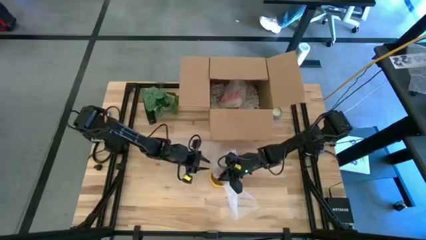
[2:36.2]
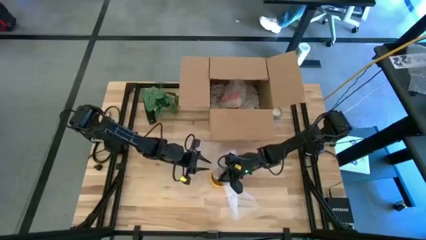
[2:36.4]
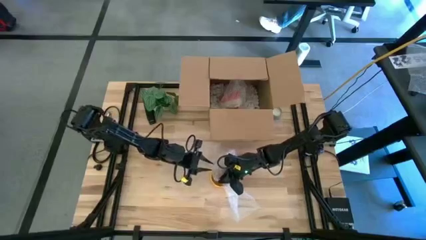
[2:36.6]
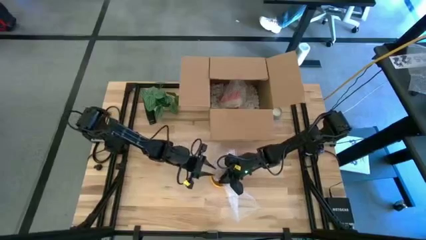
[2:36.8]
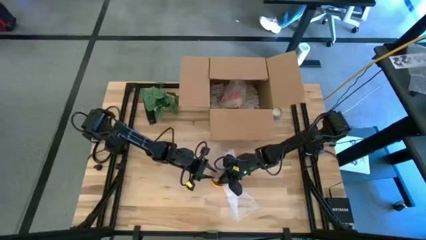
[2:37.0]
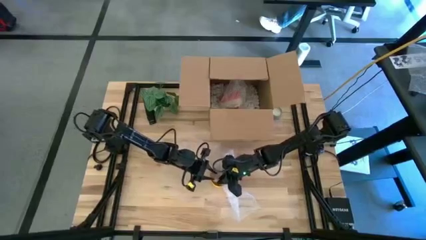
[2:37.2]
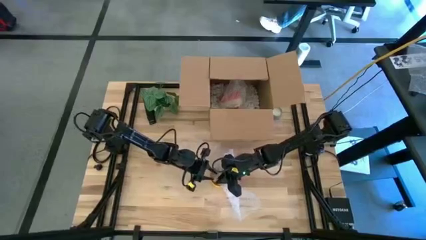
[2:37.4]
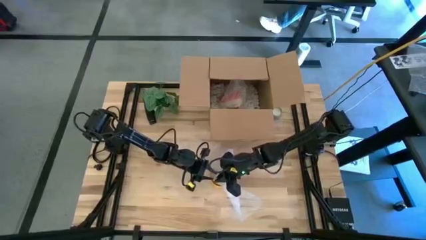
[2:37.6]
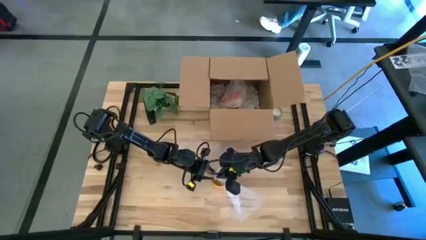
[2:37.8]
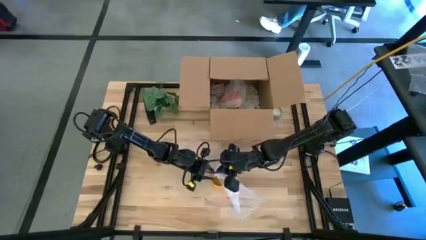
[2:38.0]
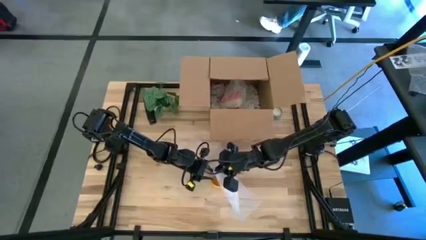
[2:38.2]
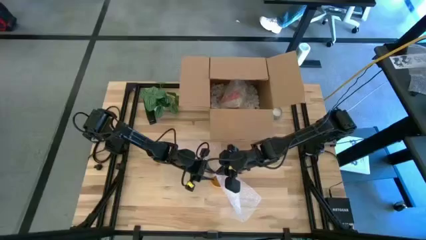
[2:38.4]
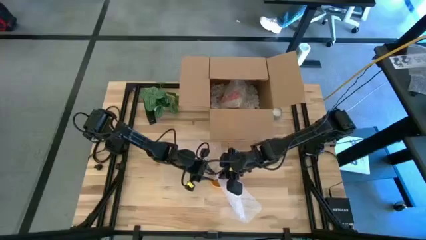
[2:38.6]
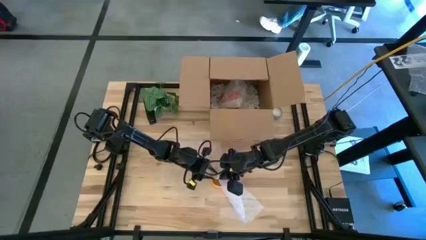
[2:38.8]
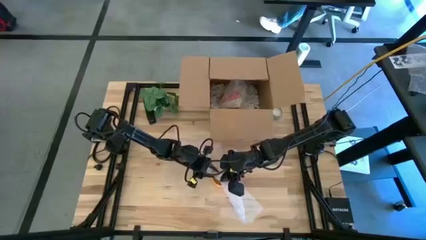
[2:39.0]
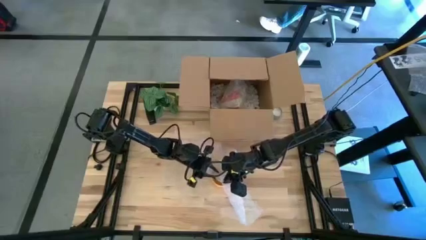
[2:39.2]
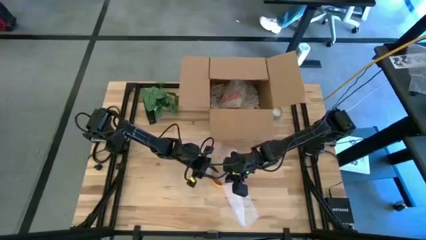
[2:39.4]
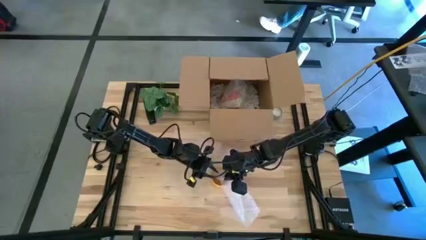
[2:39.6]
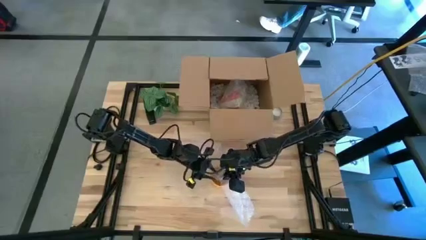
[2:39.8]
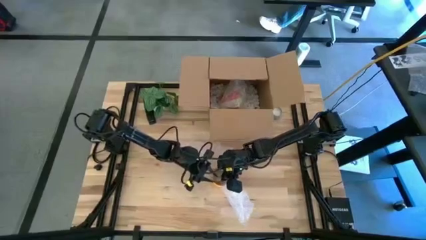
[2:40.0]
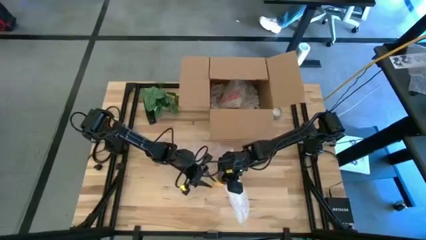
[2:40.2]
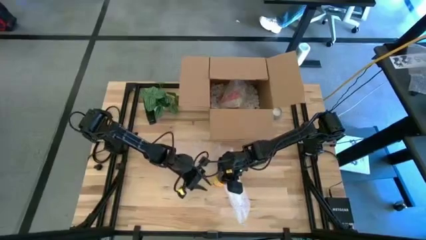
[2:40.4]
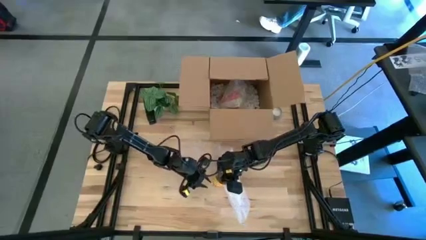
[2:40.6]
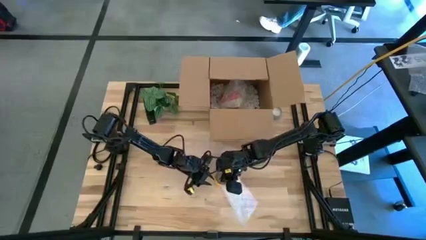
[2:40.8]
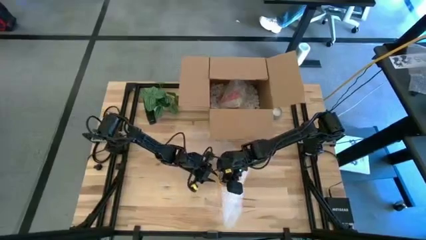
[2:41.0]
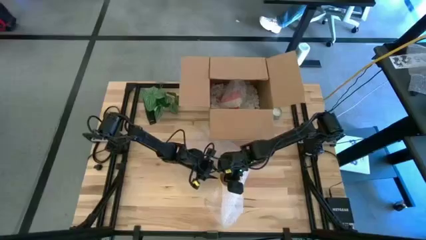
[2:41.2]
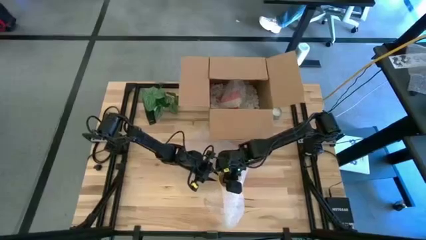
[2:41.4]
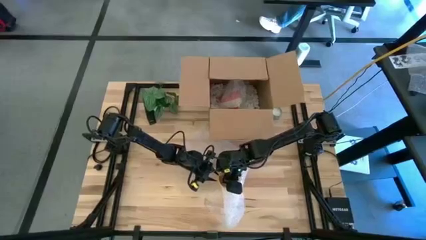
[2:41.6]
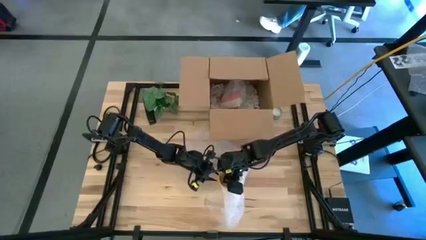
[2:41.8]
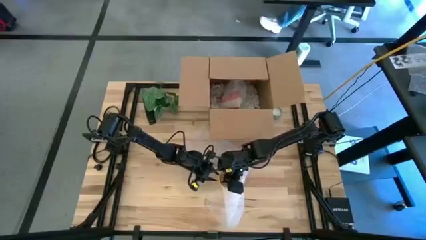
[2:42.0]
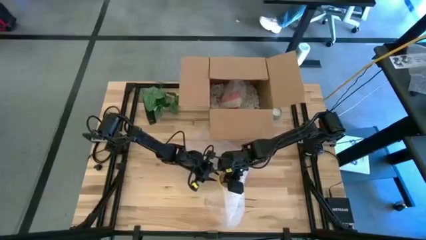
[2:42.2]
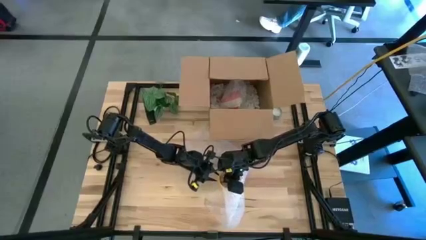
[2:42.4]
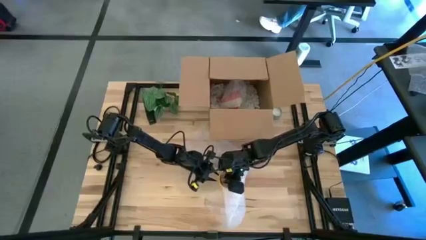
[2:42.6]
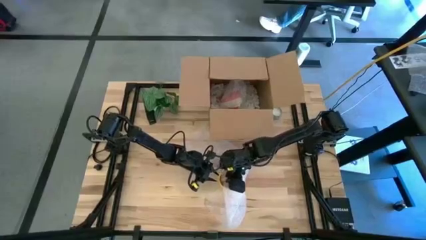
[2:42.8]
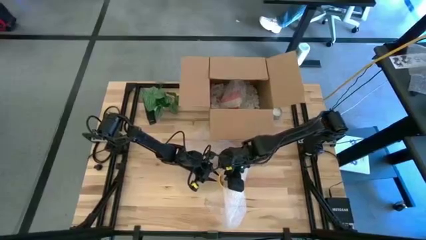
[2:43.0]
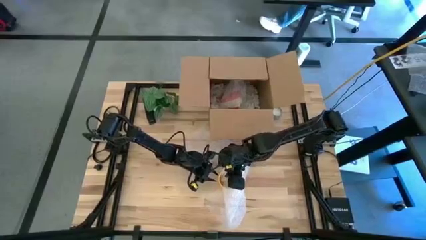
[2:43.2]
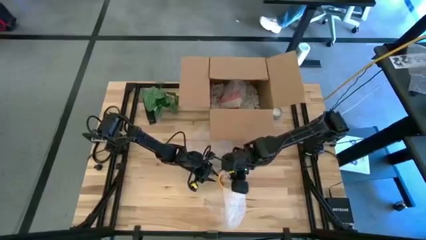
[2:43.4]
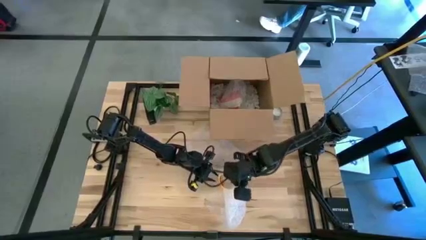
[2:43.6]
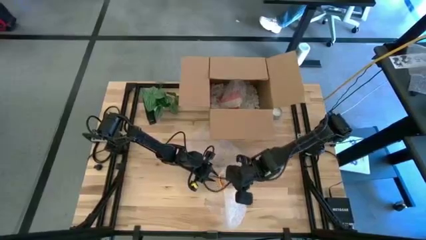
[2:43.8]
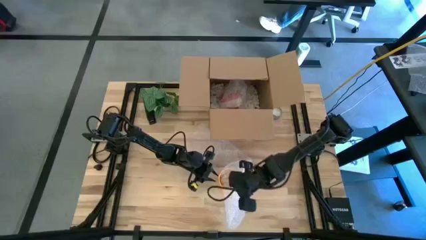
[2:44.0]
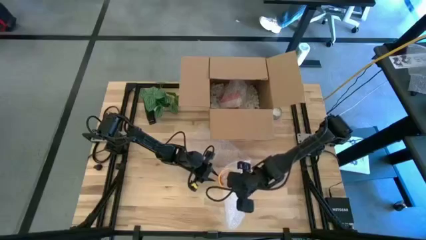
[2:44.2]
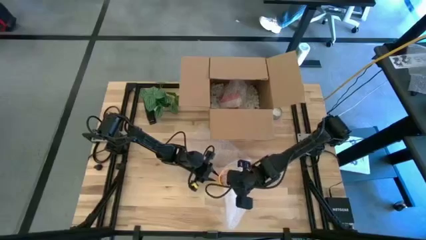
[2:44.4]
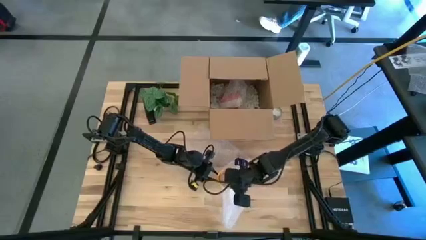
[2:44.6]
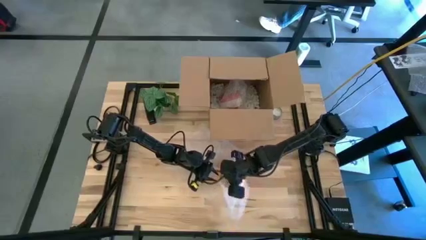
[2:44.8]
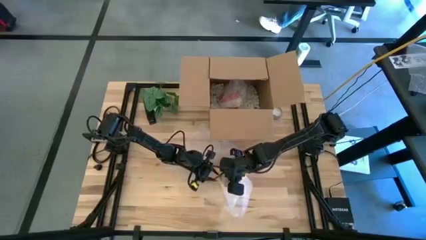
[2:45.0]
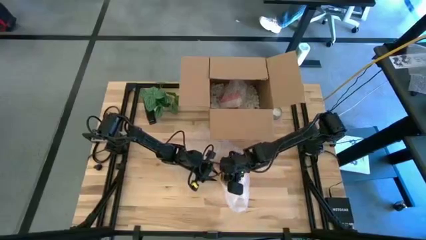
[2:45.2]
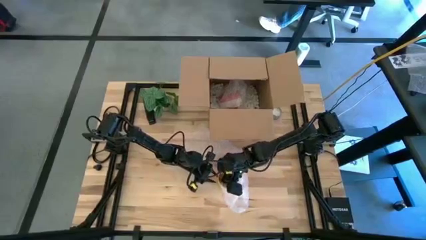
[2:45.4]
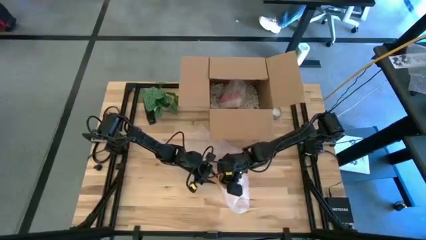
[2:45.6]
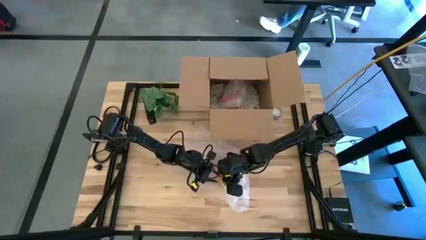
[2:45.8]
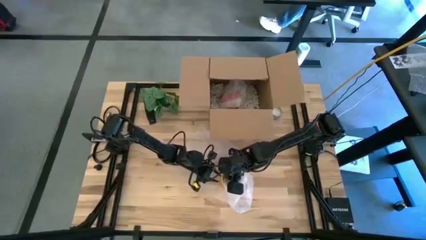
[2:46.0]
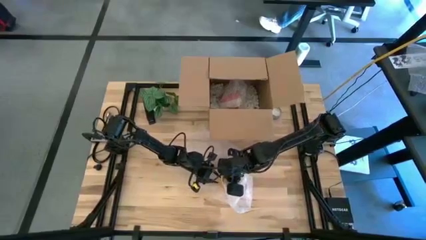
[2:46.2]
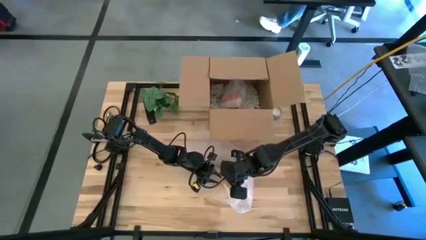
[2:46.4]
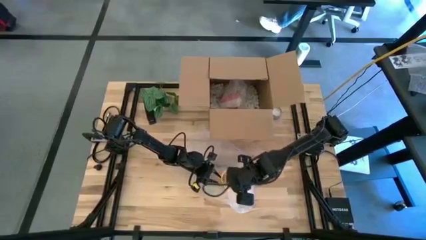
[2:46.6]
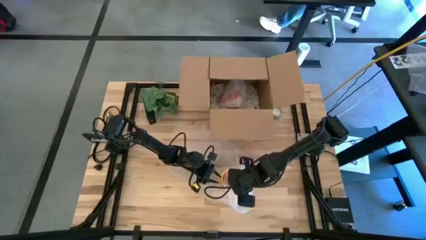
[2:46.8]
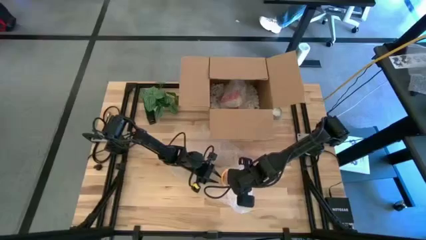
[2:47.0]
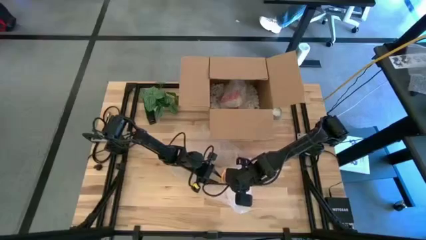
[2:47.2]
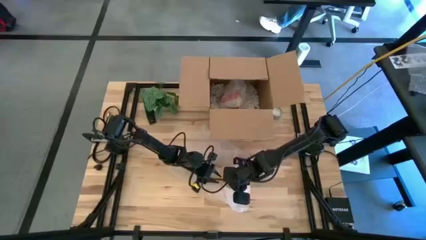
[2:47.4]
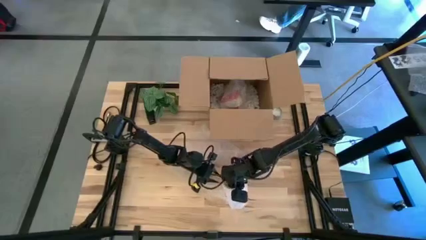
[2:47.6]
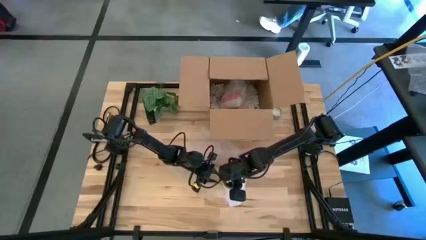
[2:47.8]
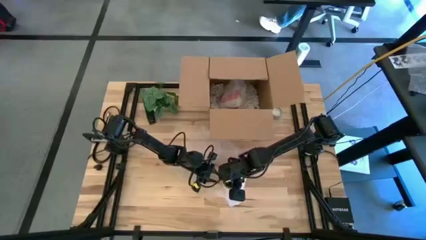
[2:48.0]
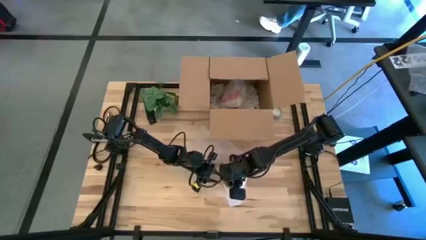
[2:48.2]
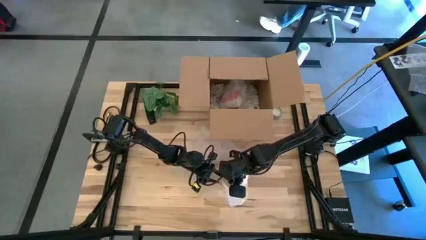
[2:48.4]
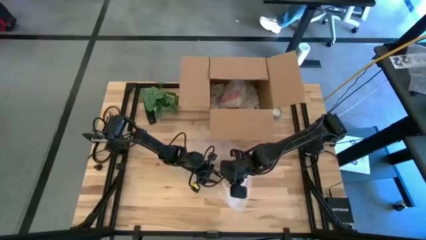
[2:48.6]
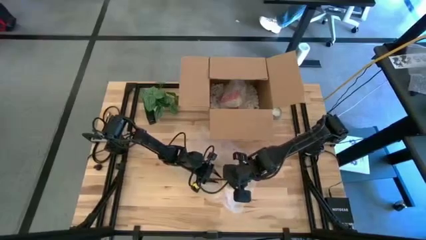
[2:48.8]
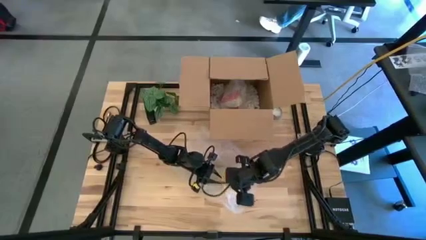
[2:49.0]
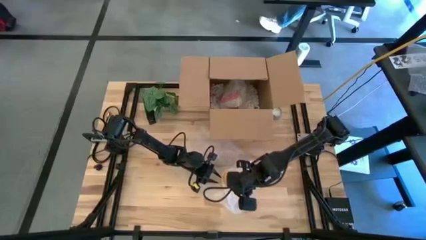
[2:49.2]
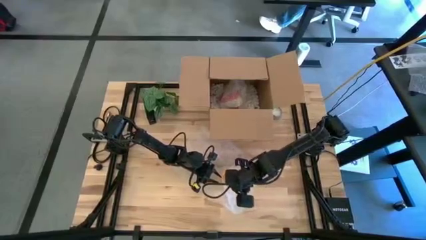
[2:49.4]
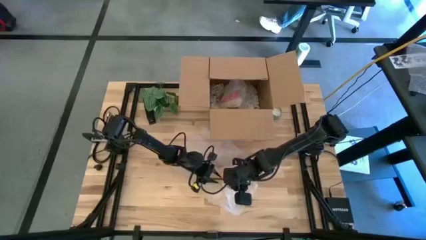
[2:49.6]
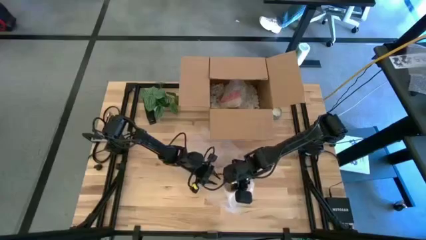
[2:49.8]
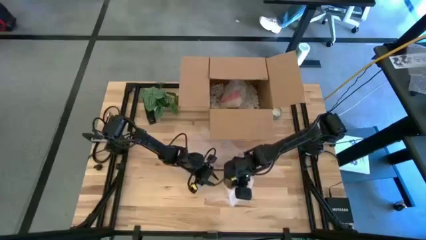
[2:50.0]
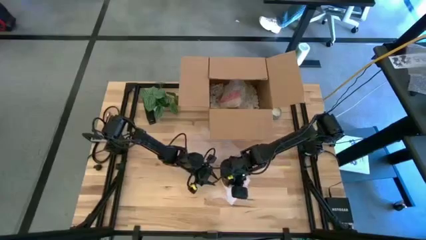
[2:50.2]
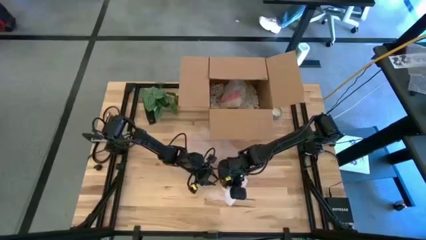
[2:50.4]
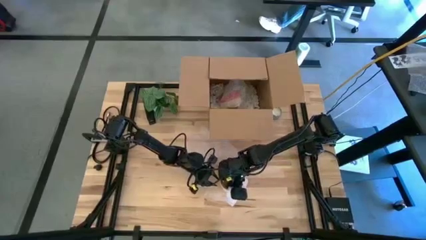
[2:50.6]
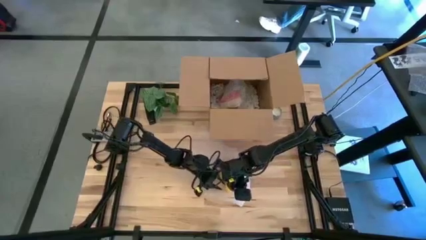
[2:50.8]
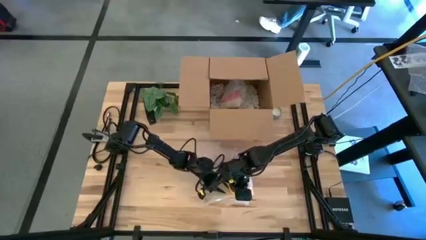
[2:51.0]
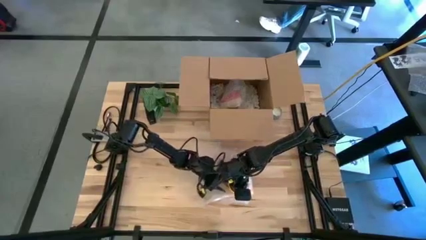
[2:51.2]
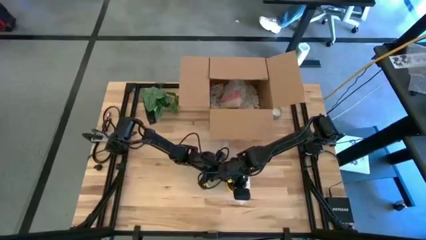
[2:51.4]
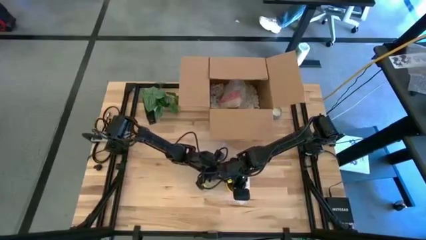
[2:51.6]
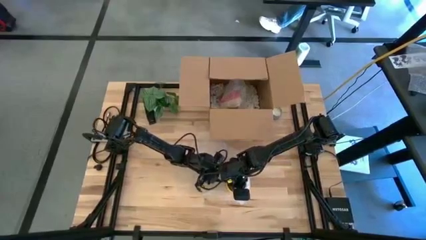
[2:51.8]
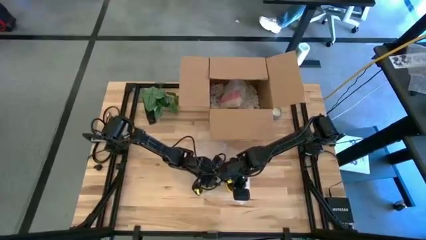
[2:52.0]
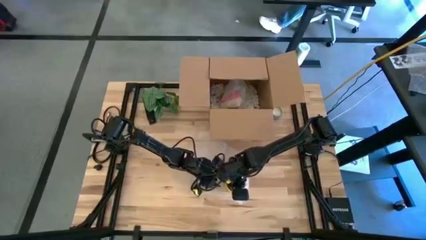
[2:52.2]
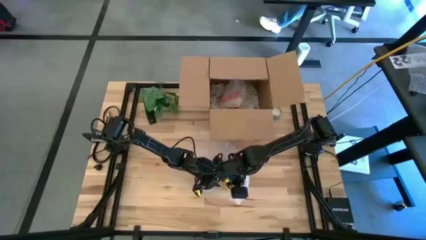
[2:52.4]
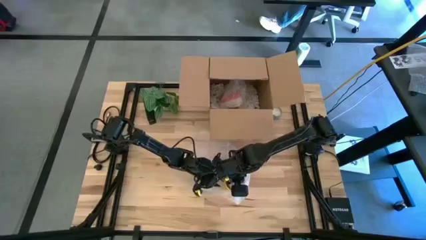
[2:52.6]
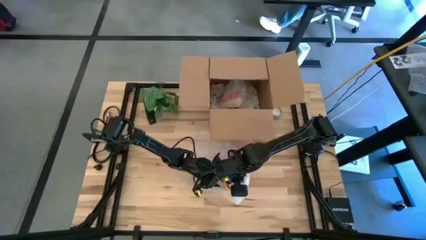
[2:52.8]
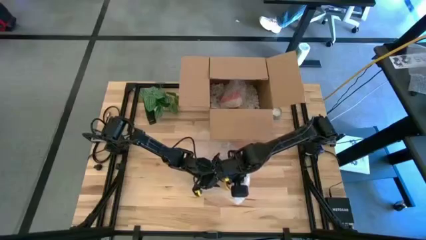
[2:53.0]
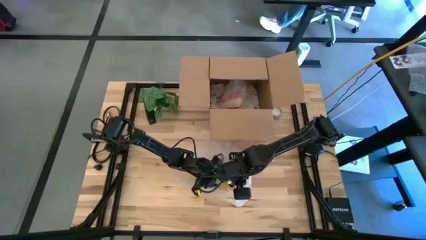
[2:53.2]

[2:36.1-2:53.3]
Task: wrap mug
Wrap the yellow mug with the bubble wrap
